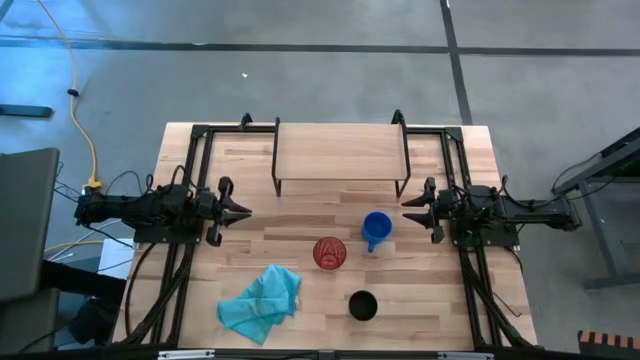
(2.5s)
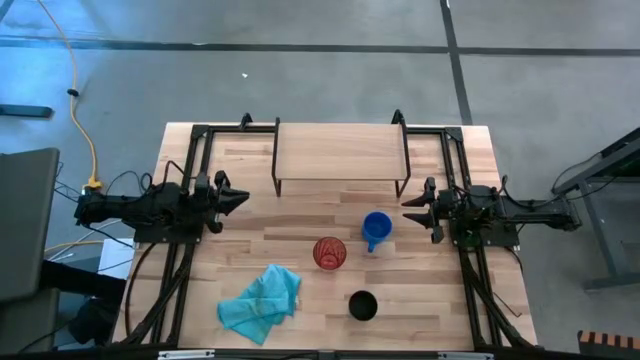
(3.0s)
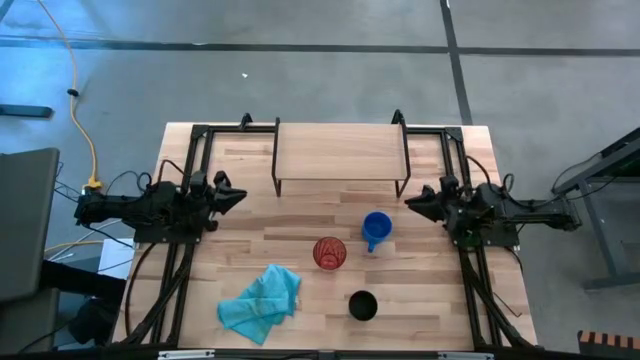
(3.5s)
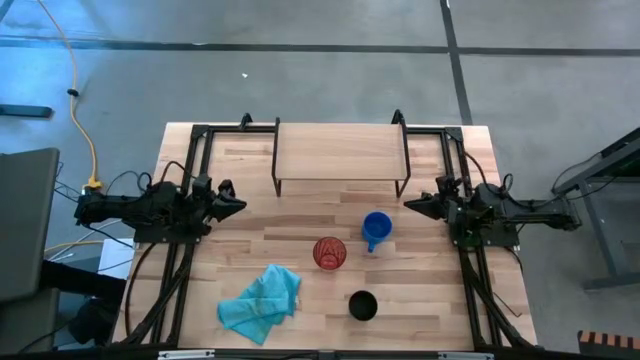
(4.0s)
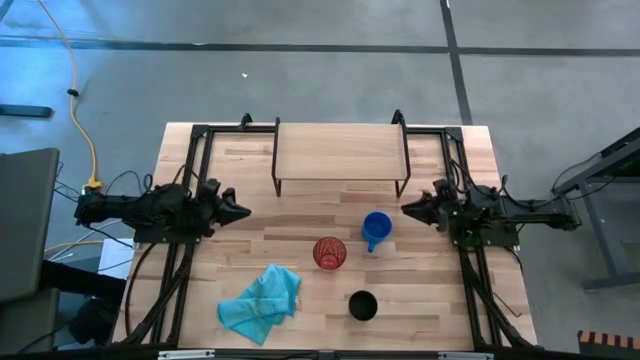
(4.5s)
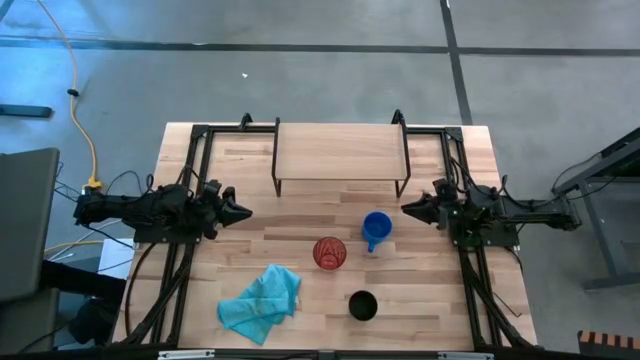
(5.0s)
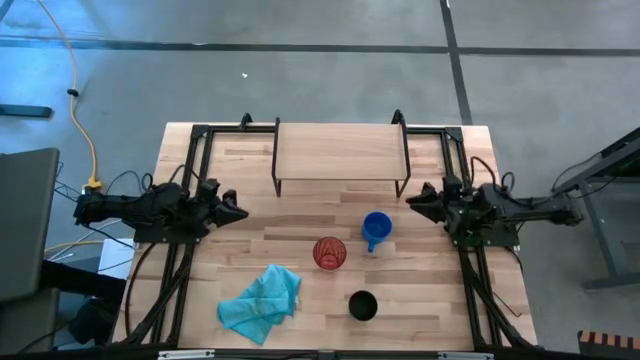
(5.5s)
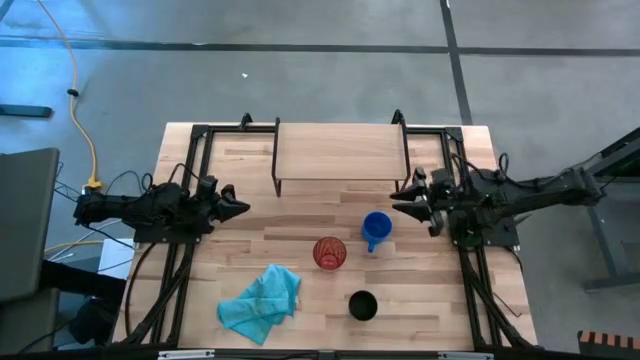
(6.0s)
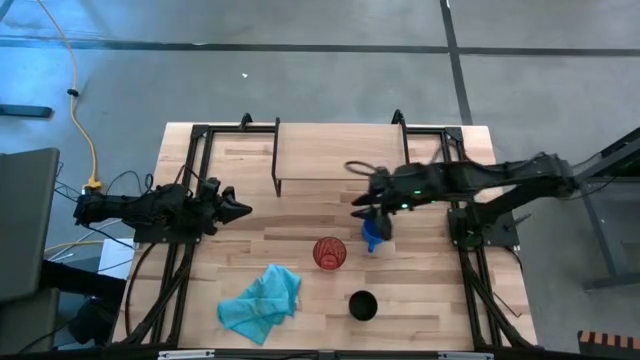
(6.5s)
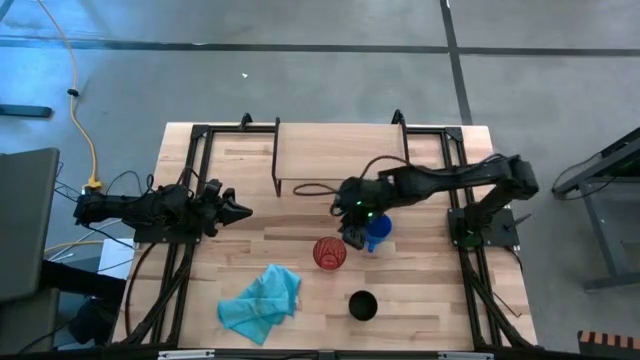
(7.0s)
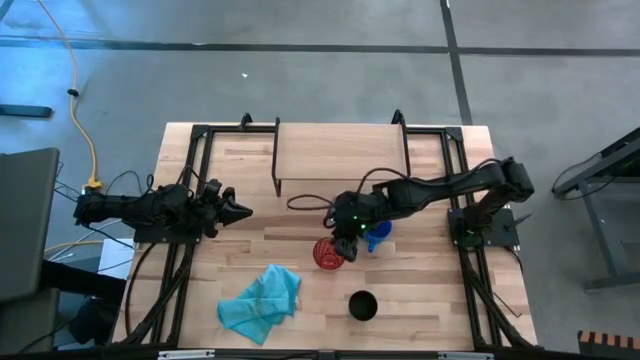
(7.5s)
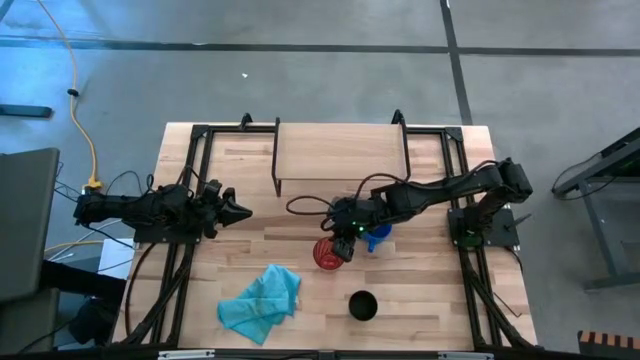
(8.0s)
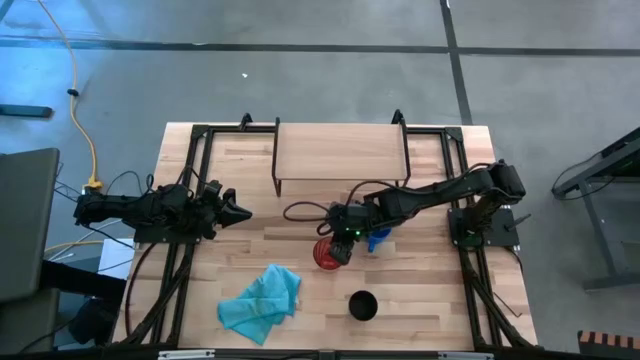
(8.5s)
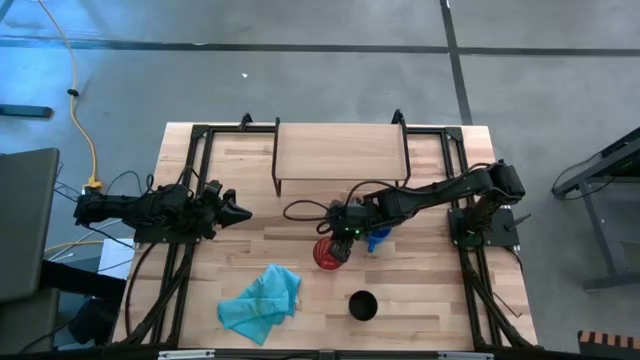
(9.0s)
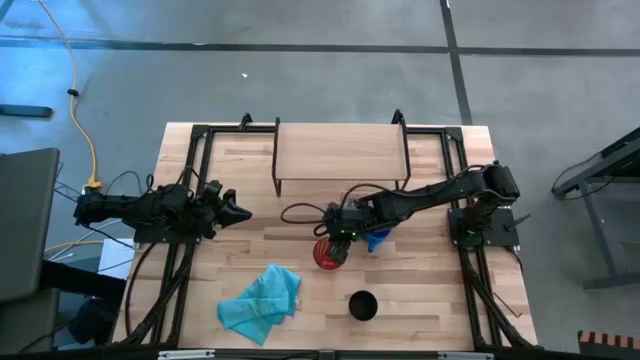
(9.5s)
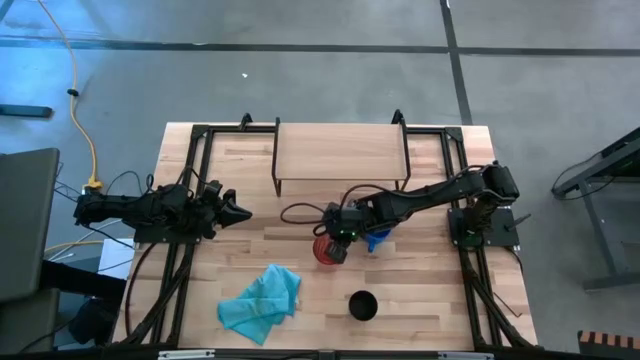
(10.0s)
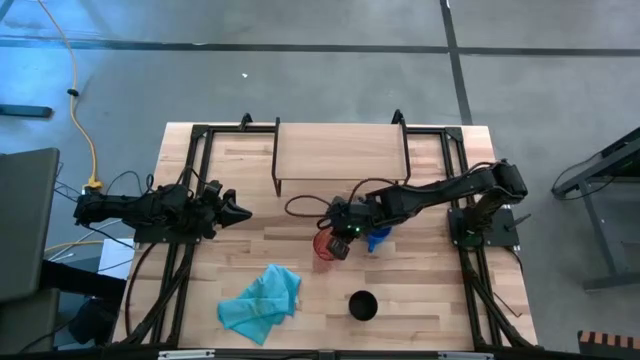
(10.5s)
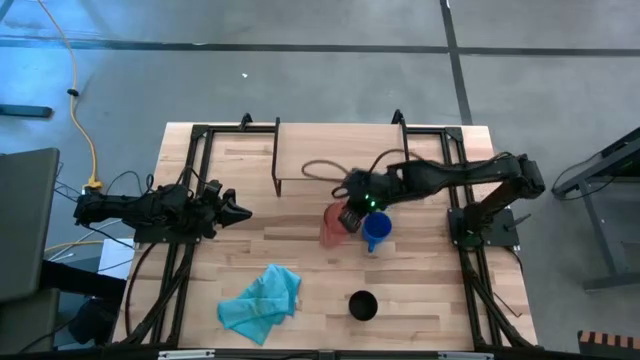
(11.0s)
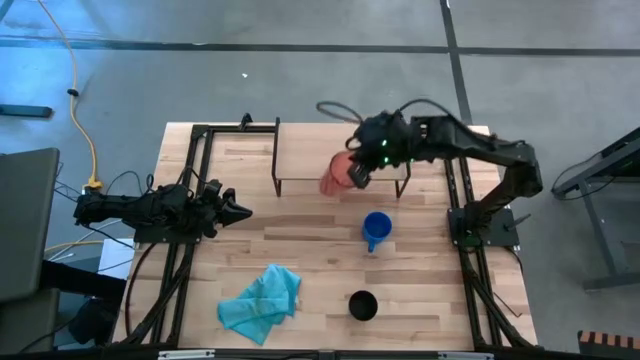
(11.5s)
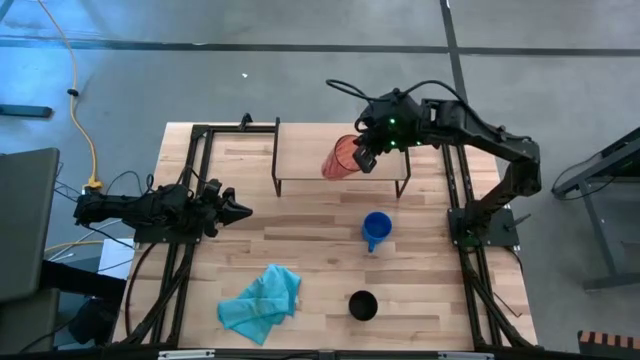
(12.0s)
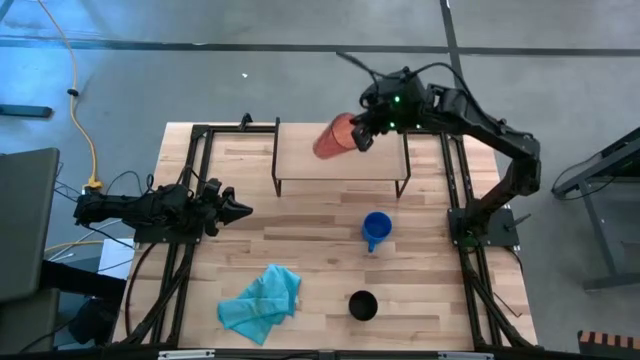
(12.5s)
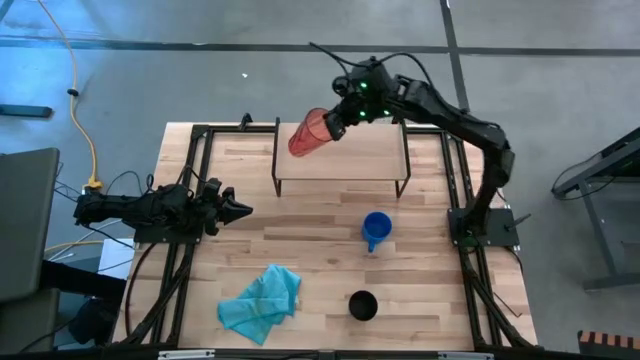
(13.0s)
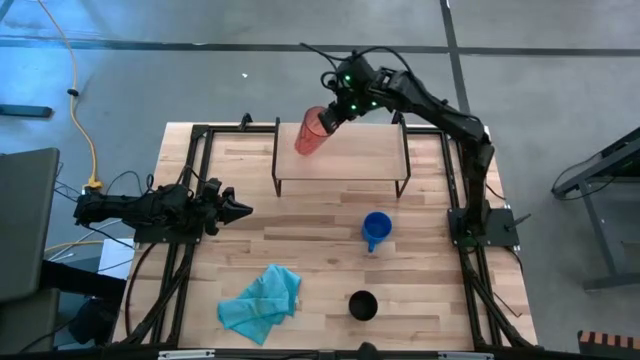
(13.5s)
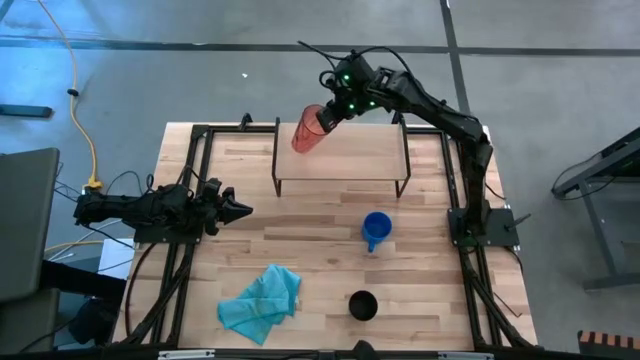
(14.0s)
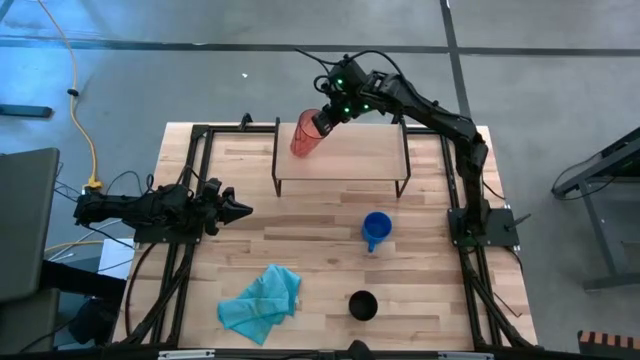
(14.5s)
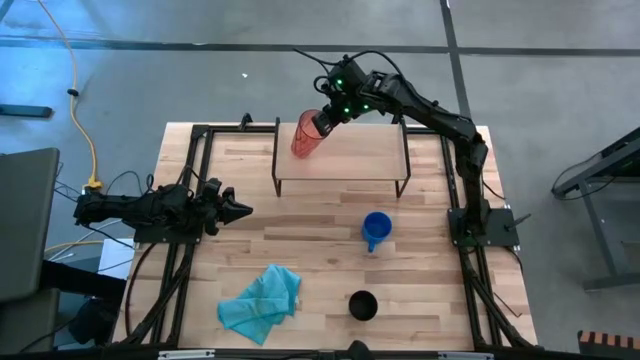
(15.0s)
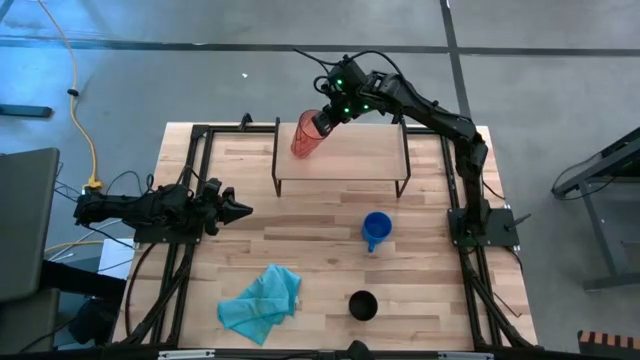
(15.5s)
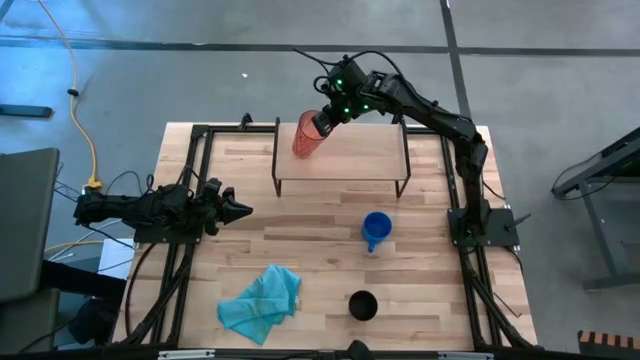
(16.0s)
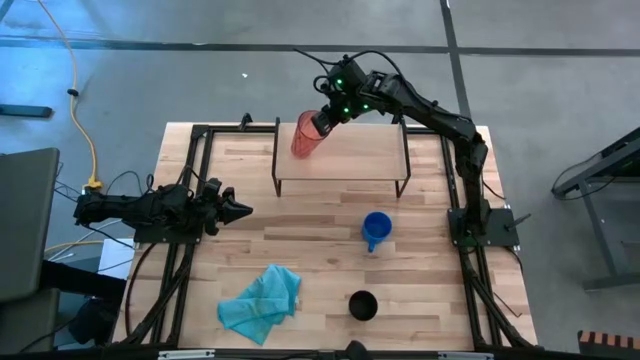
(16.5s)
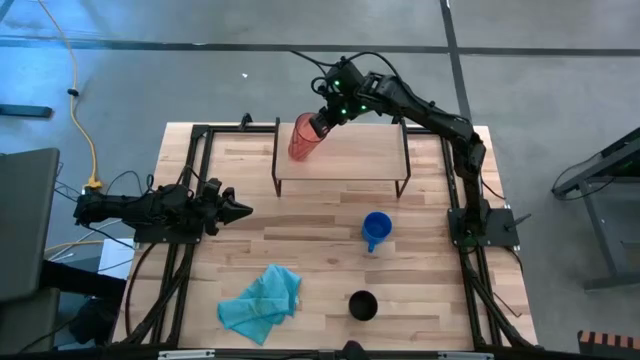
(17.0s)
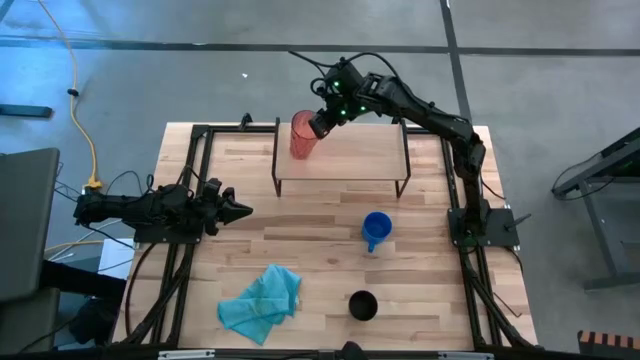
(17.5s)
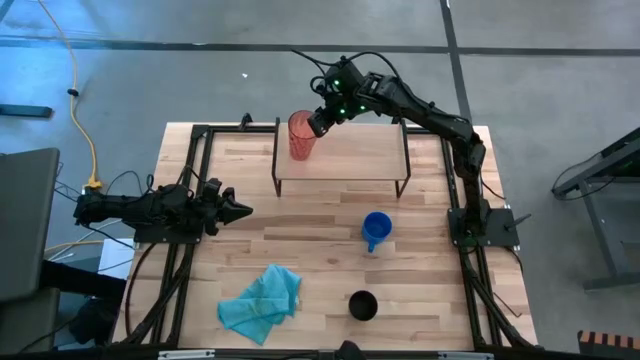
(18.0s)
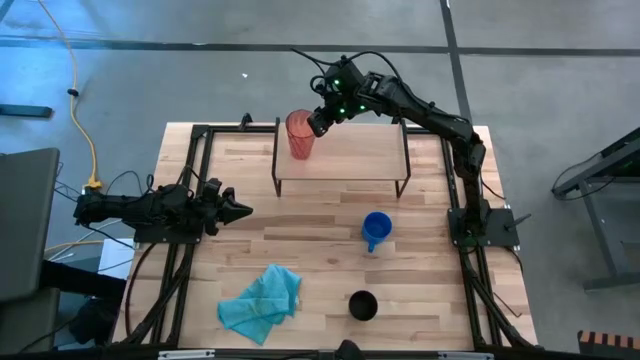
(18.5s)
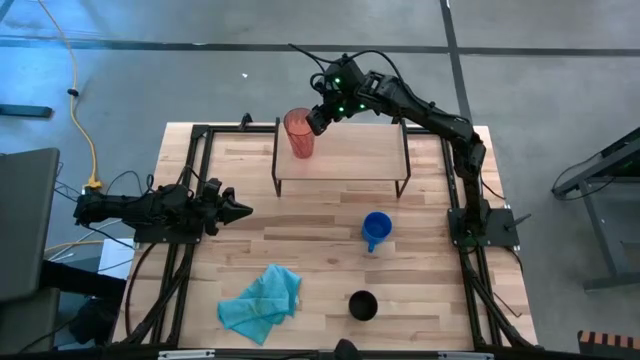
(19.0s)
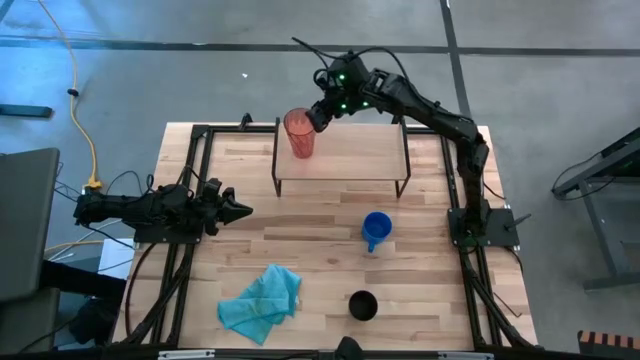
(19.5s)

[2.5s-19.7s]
Task: Stack small to large cups/mugs on shelf
Put the red cup on the shelf

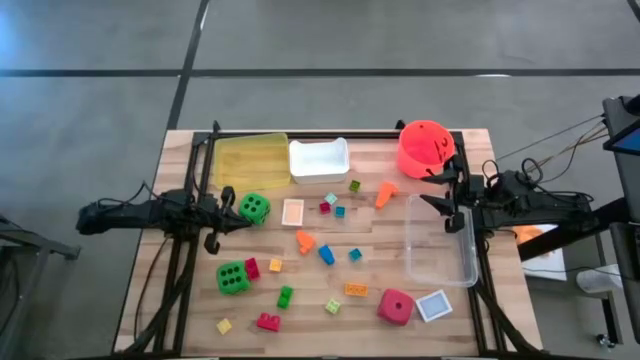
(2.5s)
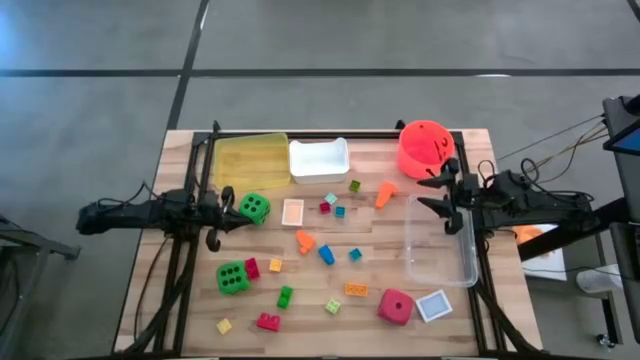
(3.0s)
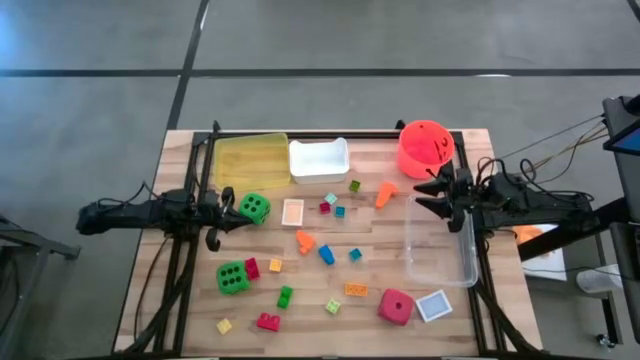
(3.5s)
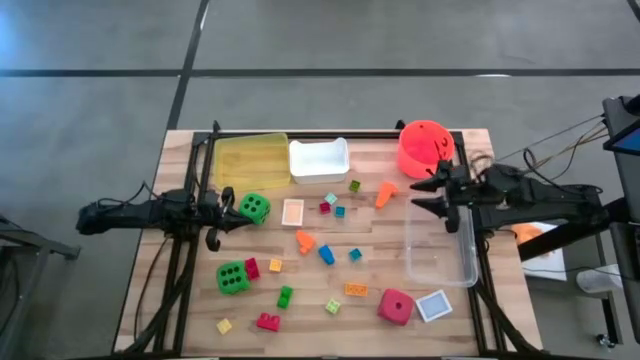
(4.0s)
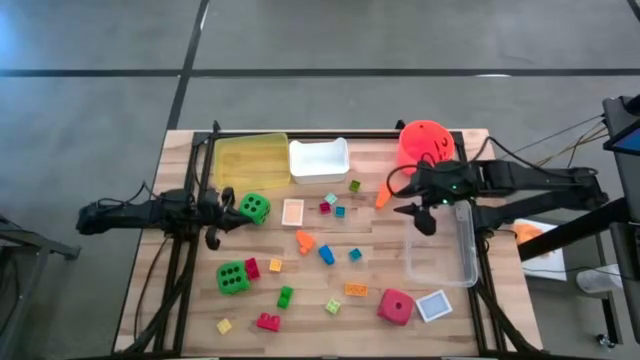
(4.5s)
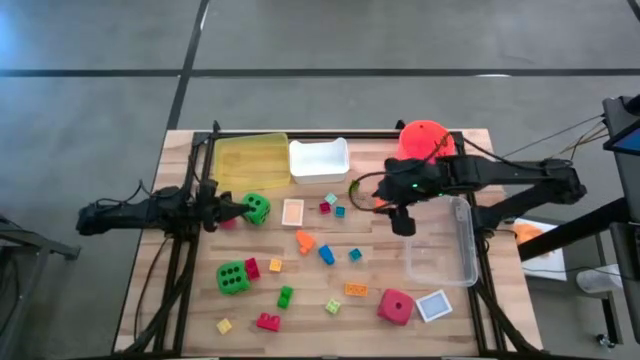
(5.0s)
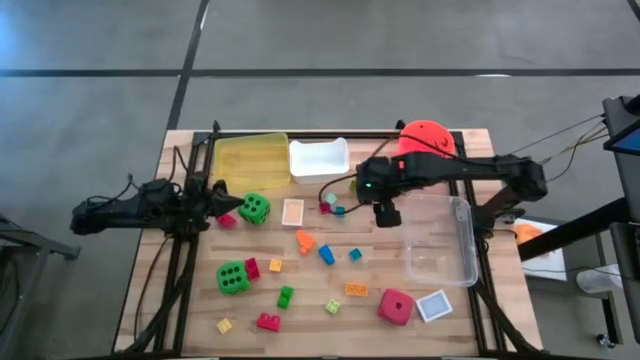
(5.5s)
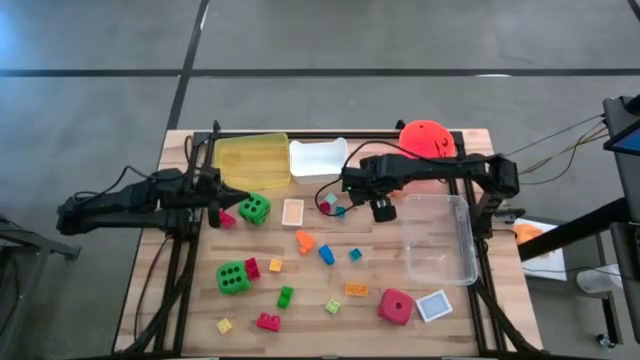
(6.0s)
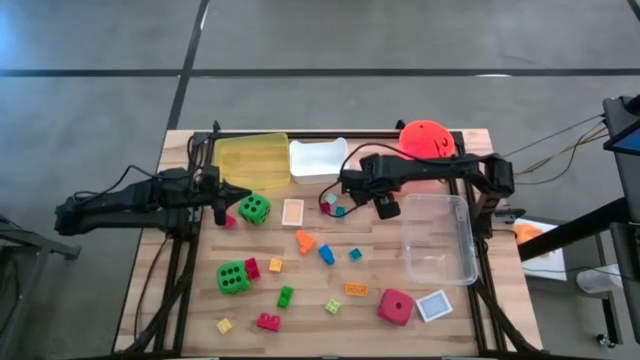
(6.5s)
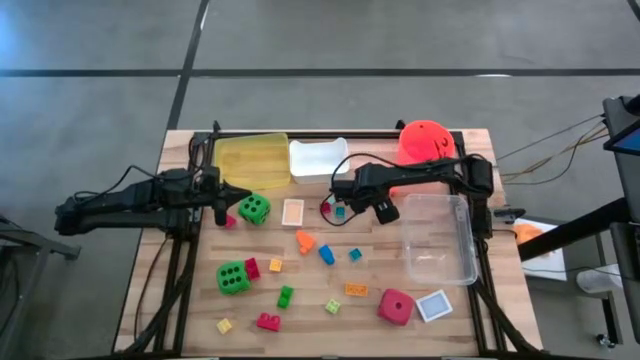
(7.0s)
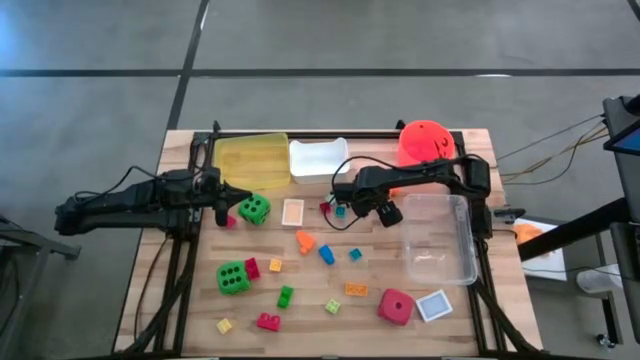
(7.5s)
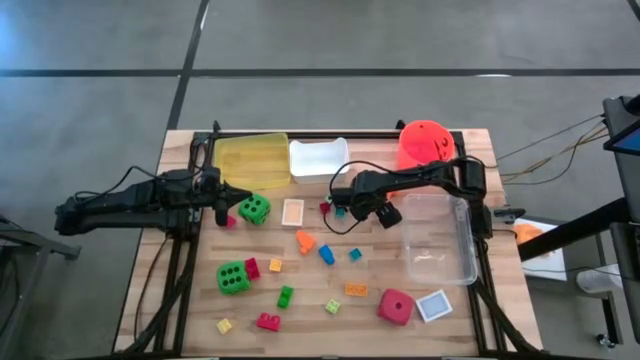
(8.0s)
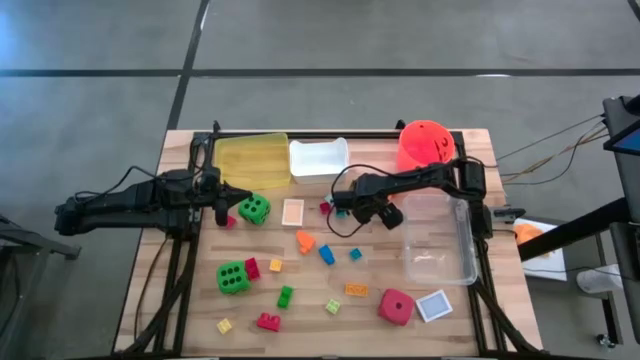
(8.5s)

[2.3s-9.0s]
Task: Pick & Place Toys
Put the orange game piece into the transparent bin
